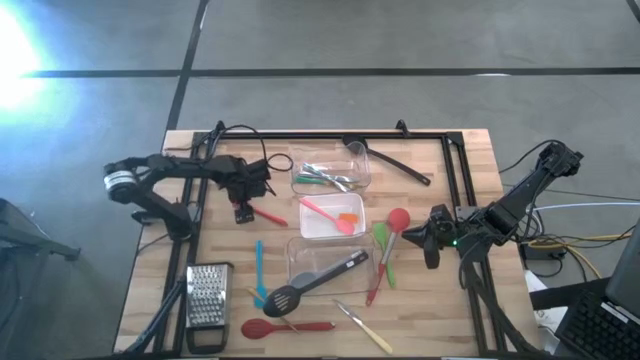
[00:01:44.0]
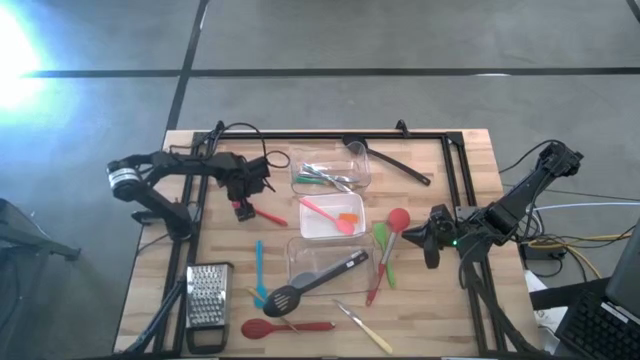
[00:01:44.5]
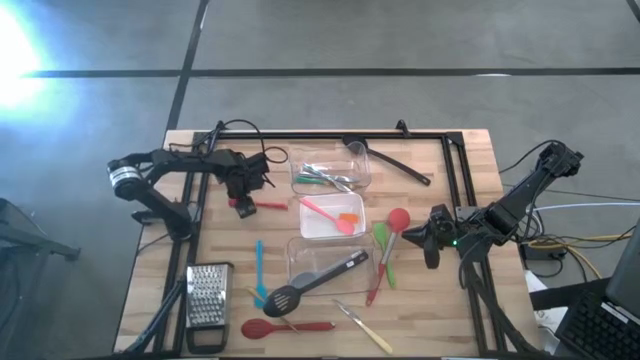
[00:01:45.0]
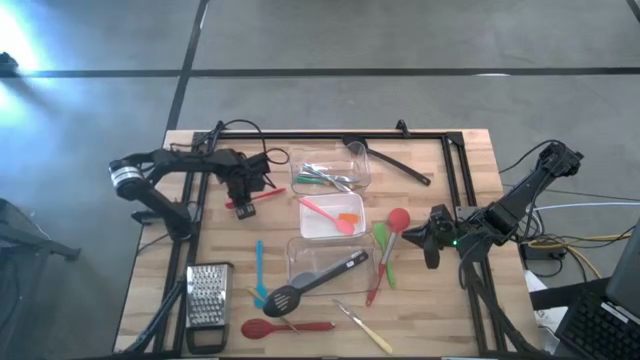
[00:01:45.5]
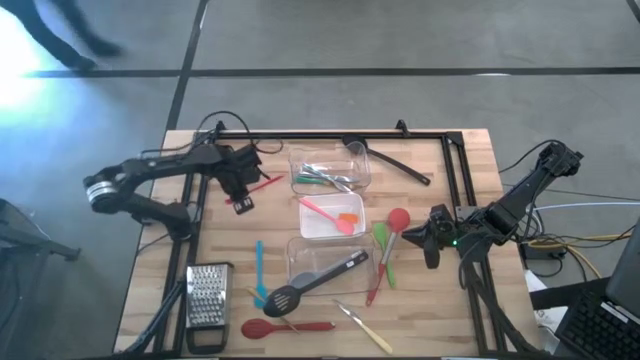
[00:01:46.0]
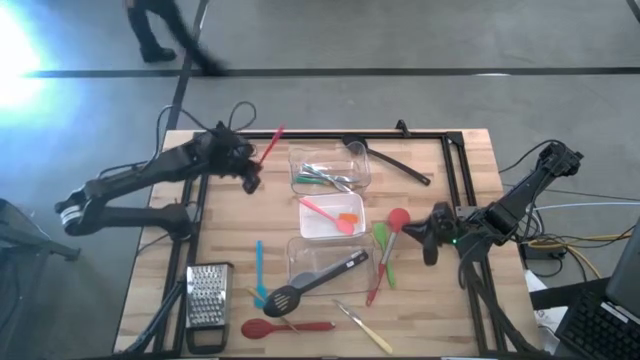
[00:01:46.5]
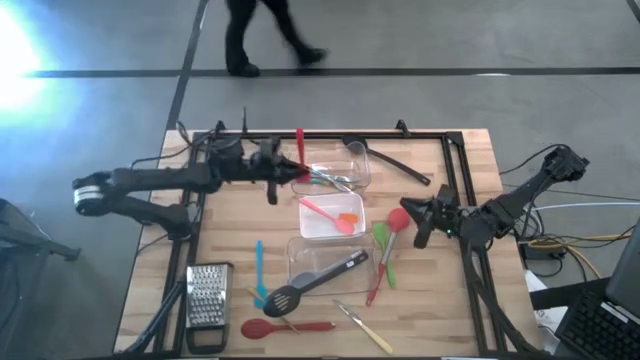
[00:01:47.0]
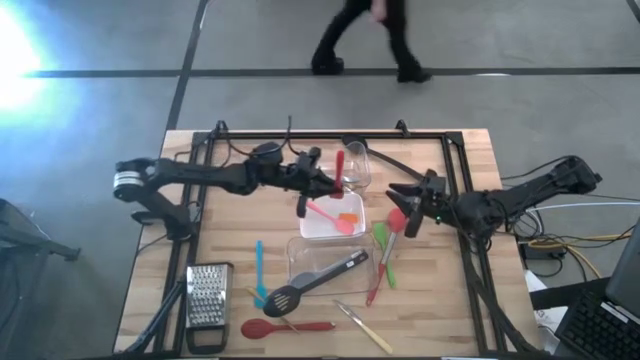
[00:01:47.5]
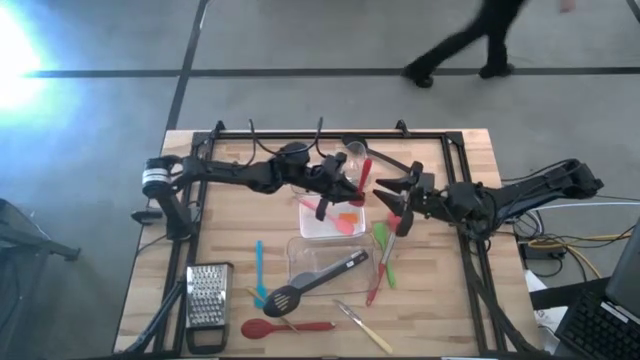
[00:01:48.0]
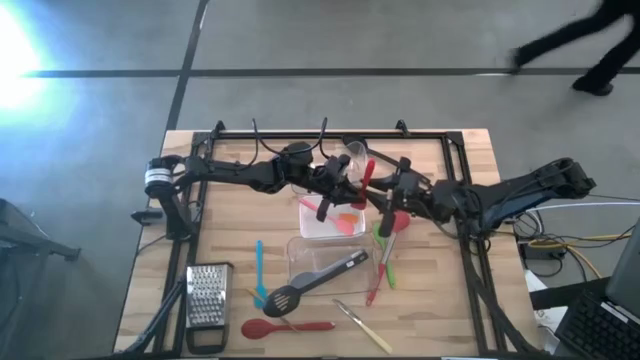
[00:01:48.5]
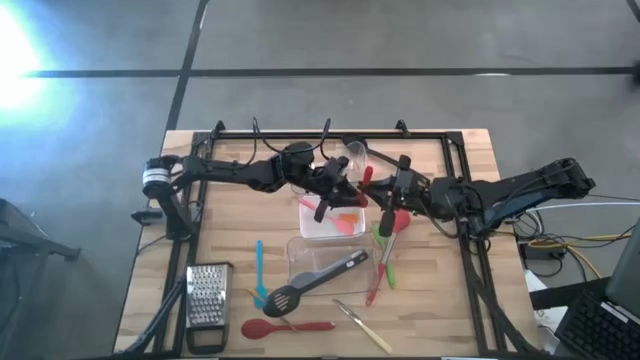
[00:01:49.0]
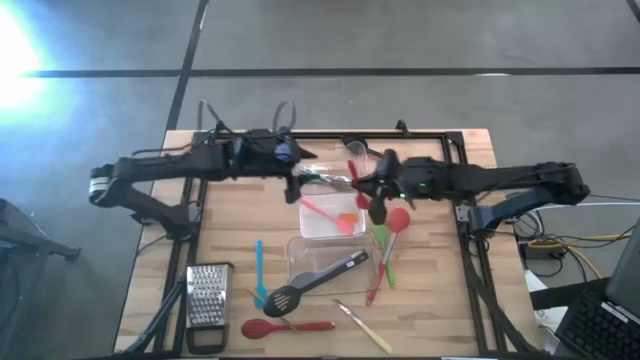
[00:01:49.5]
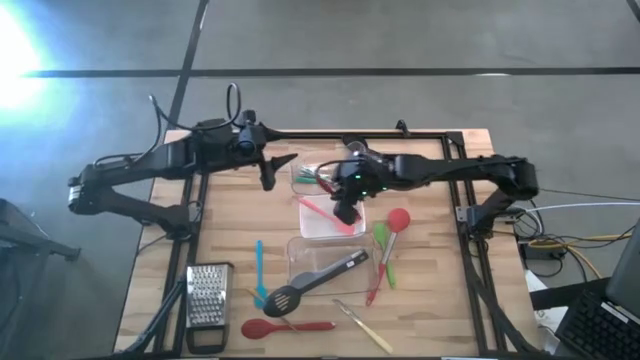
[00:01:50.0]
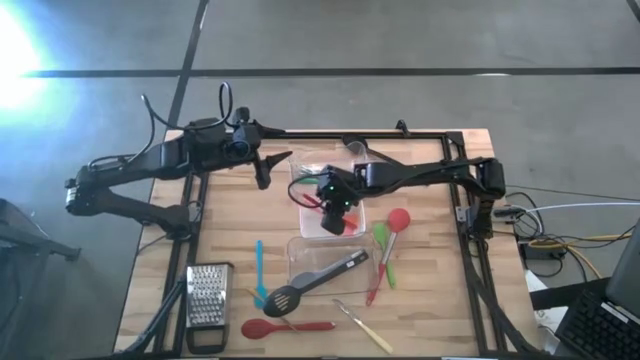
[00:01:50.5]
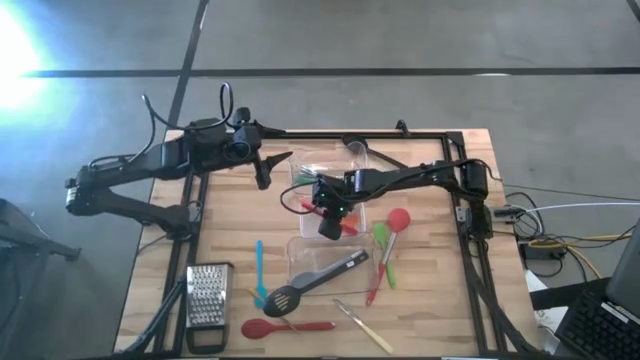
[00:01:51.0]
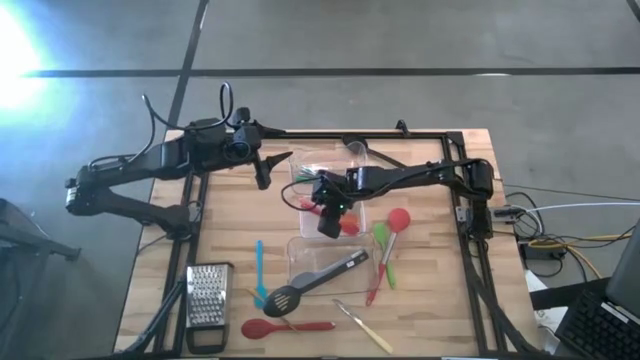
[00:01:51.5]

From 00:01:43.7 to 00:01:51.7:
Task: Pick & Place Kitchen Items
Put the red spatula into the white bin

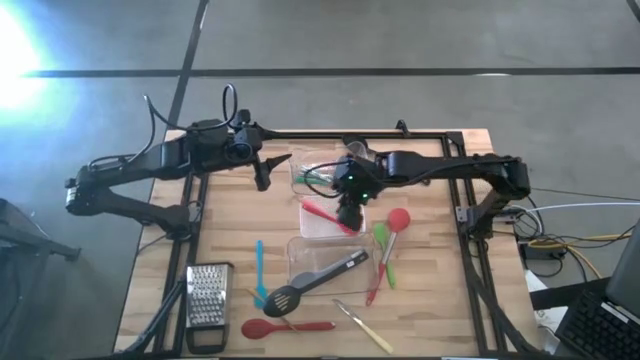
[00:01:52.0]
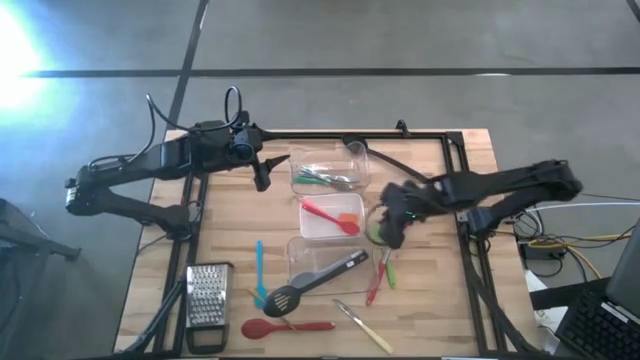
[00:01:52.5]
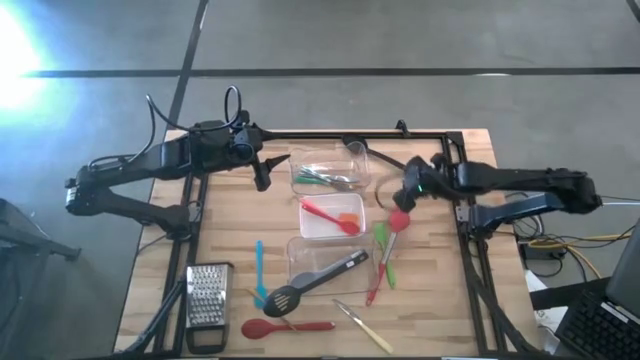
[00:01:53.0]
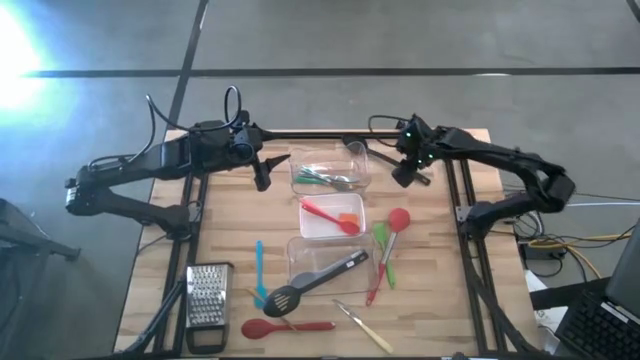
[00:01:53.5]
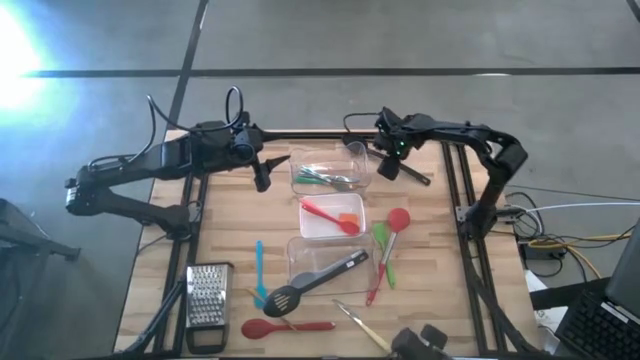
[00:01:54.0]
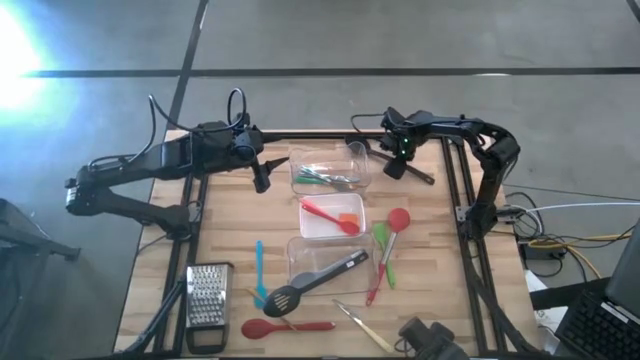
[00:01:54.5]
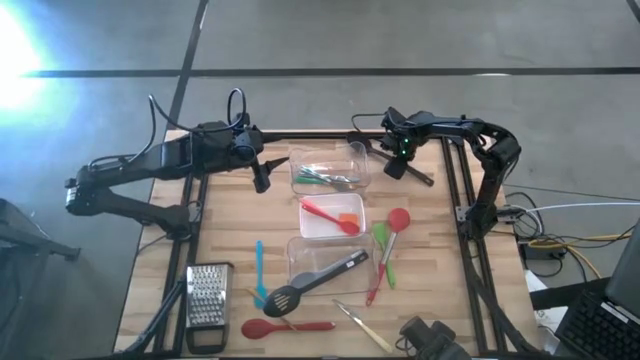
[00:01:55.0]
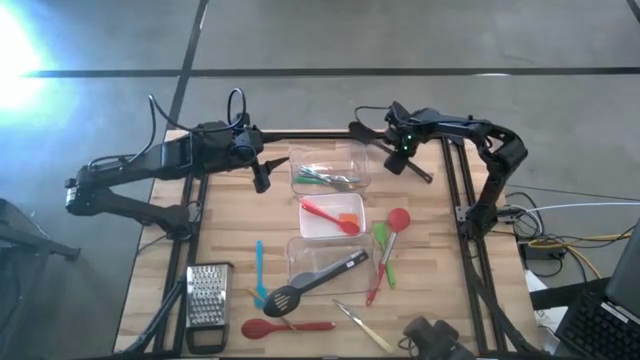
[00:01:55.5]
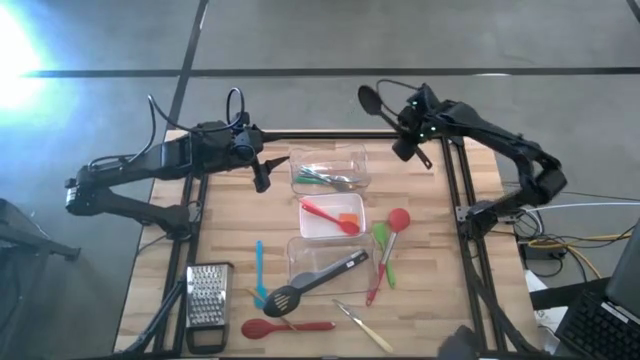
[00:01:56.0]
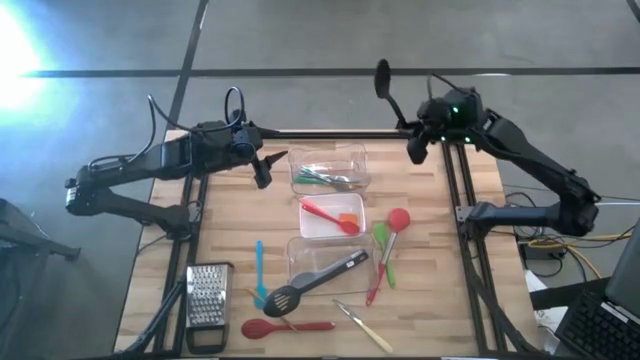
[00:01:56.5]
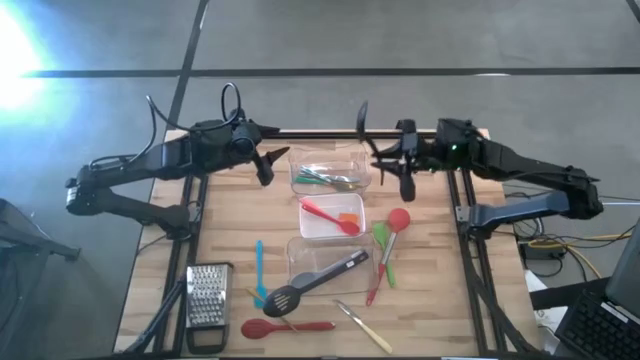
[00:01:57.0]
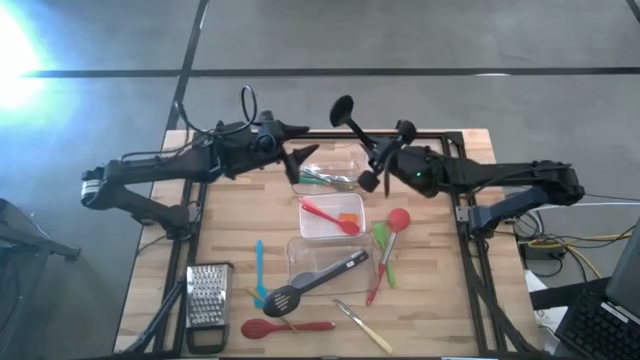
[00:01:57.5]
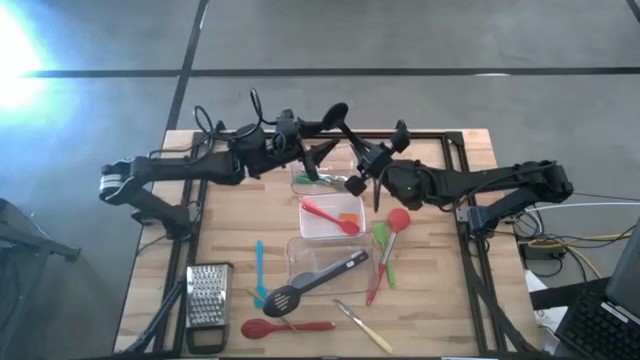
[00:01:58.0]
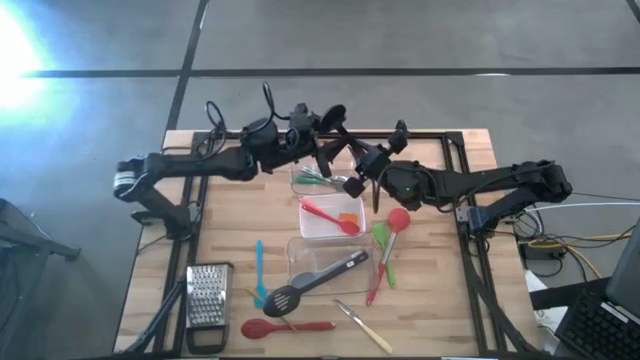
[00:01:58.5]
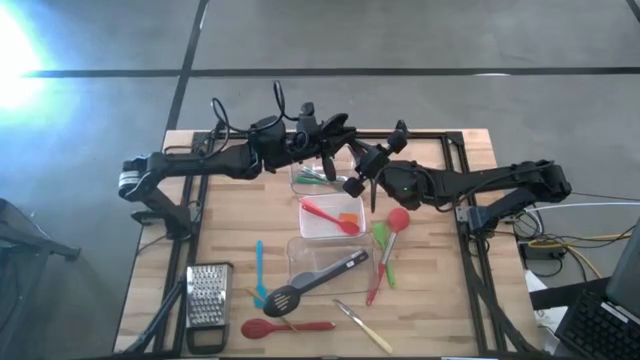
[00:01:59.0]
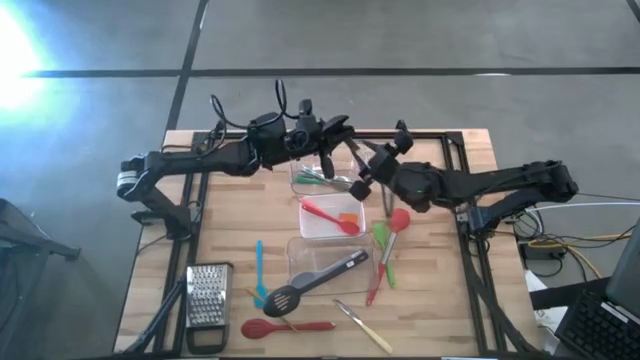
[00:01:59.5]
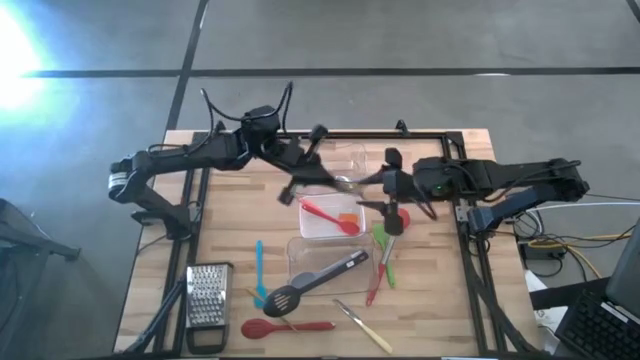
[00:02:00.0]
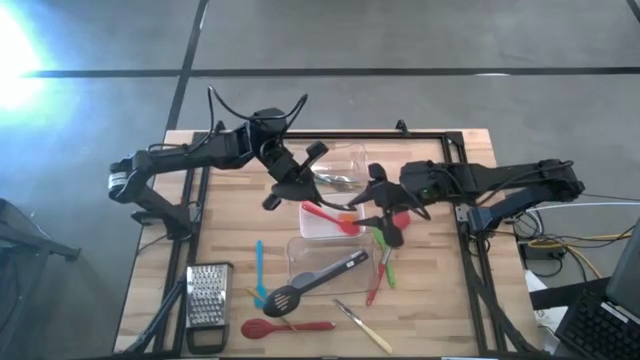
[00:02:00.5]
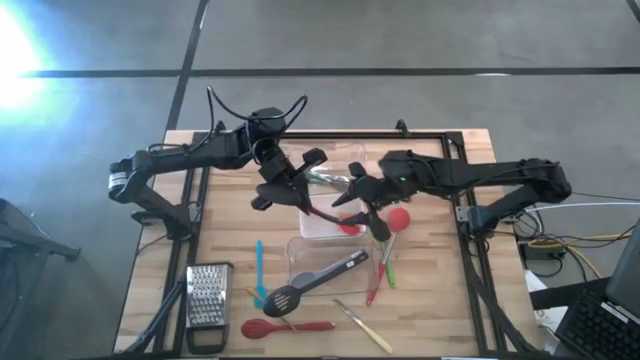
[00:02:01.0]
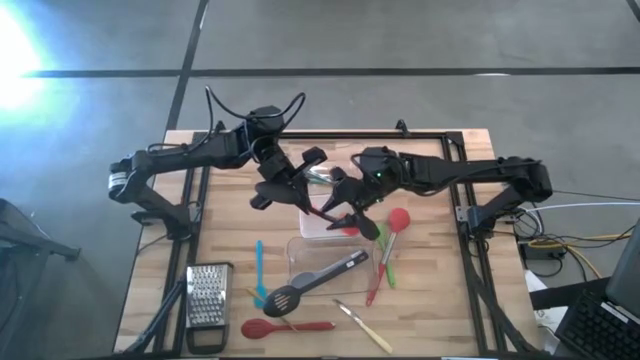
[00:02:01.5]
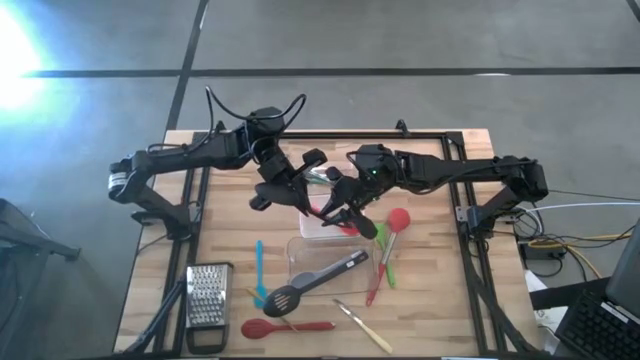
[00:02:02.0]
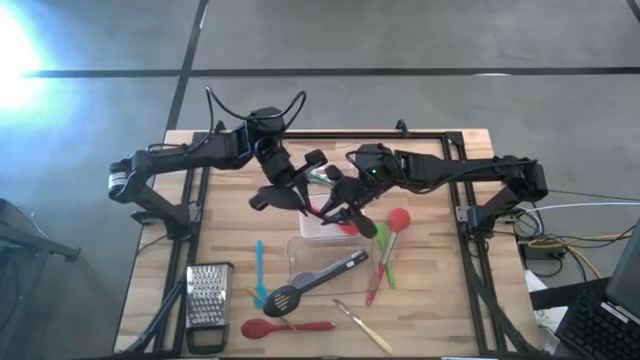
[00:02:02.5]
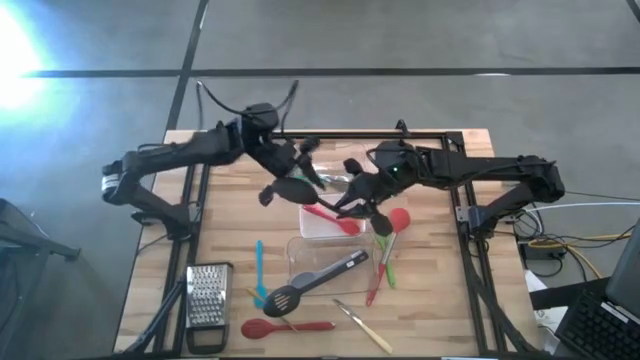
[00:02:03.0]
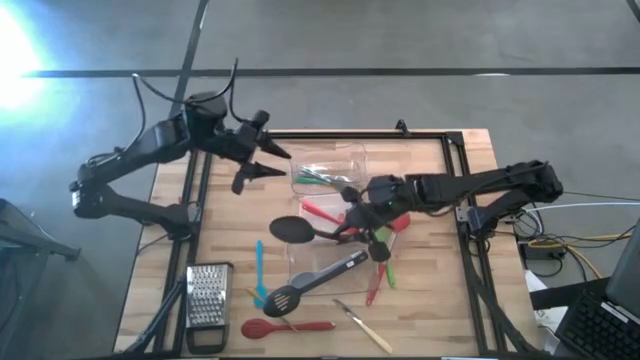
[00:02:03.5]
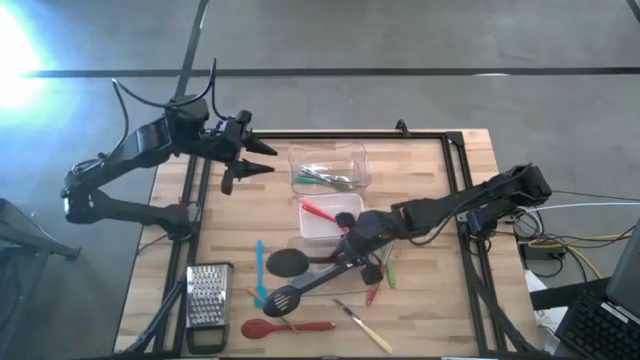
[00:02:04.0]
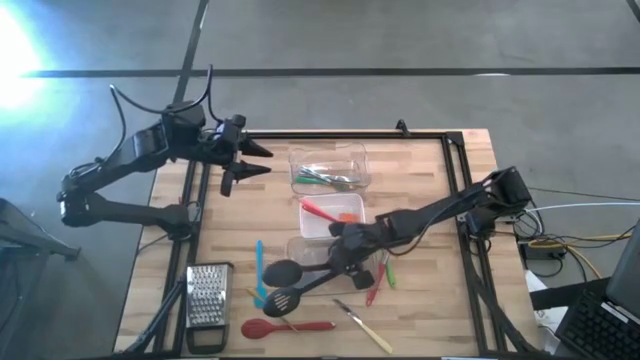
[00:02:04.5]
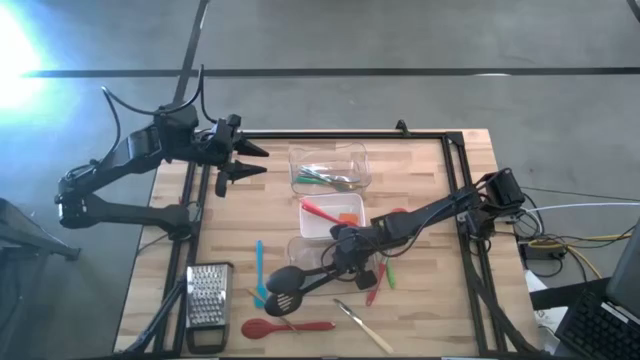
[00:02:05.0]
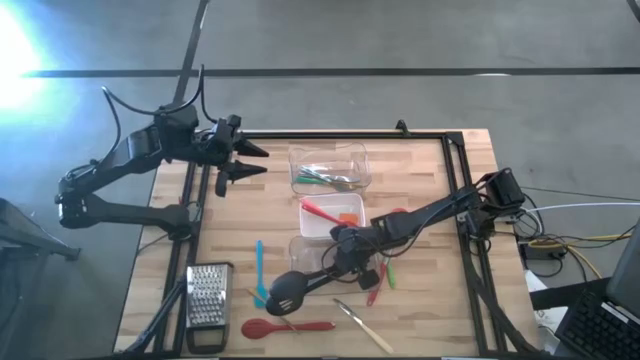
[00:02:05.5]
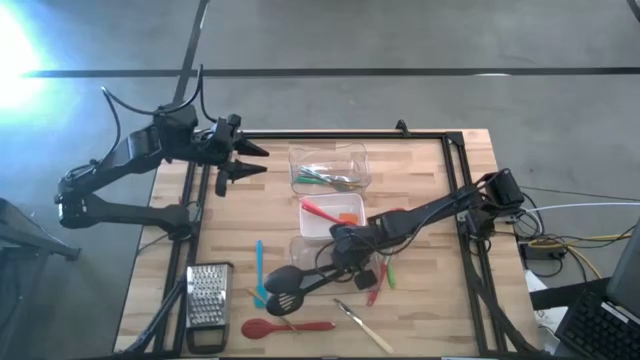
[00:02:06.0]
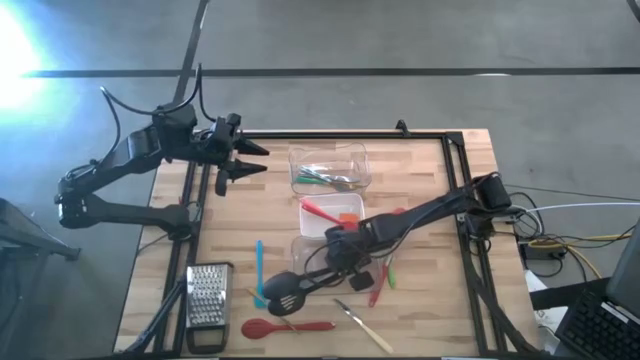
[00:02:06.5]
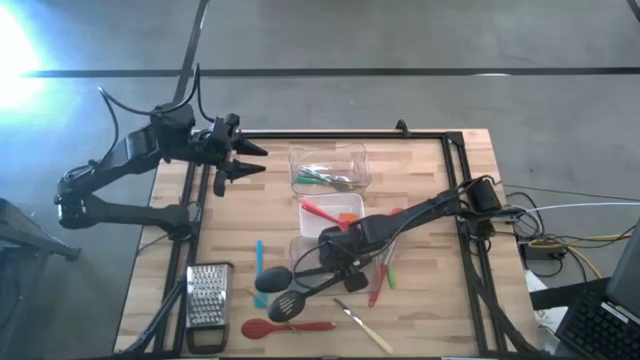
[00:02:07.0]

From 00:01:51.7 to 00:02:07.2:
Put the black serving spoon into the bottom transparent bin
